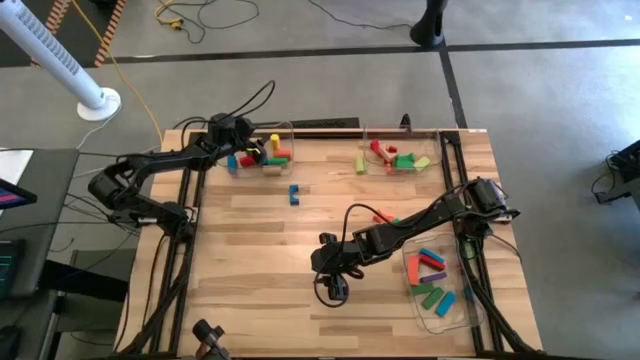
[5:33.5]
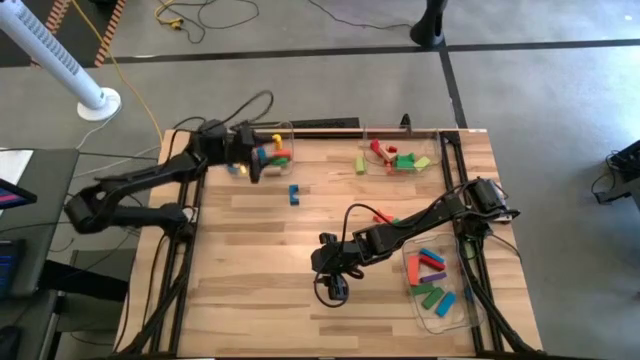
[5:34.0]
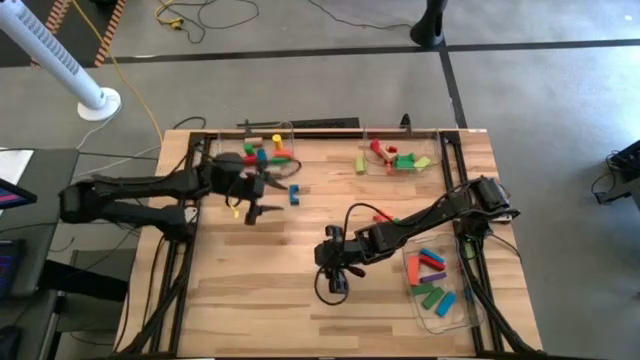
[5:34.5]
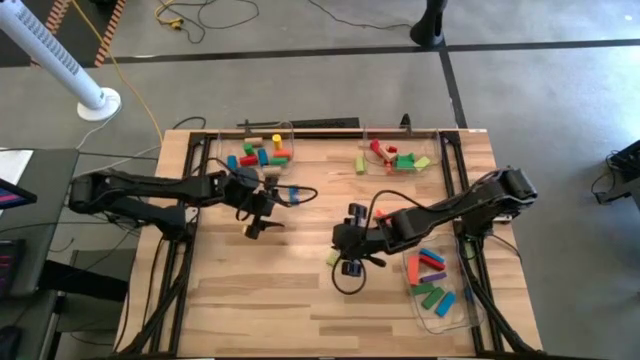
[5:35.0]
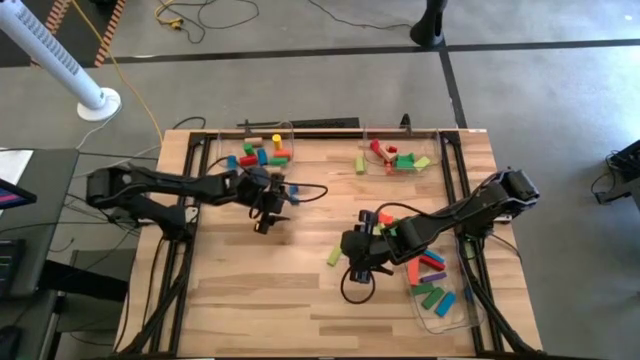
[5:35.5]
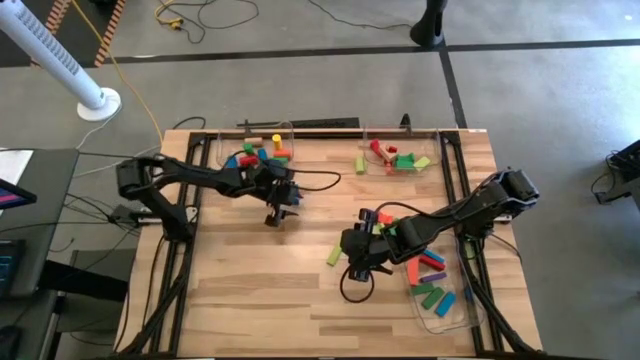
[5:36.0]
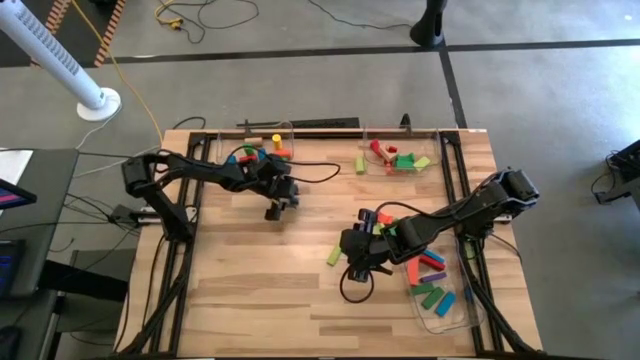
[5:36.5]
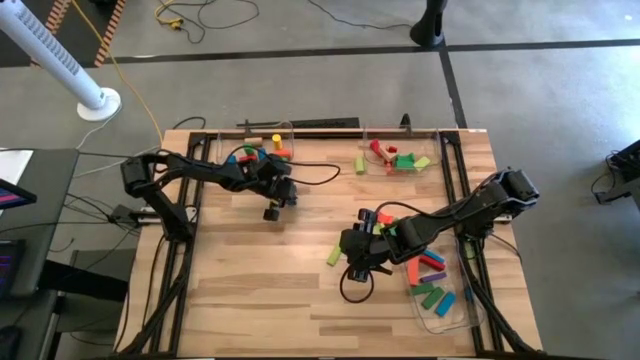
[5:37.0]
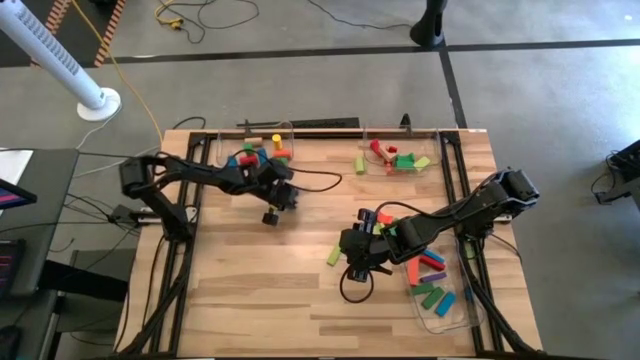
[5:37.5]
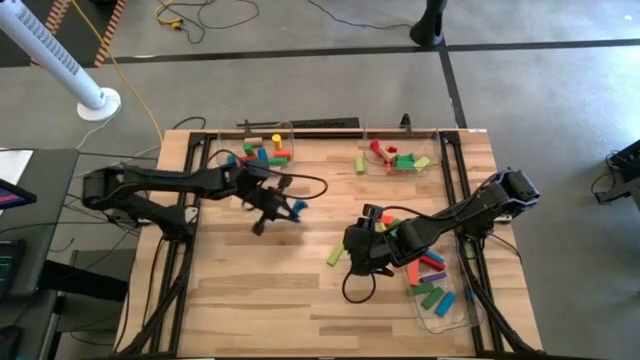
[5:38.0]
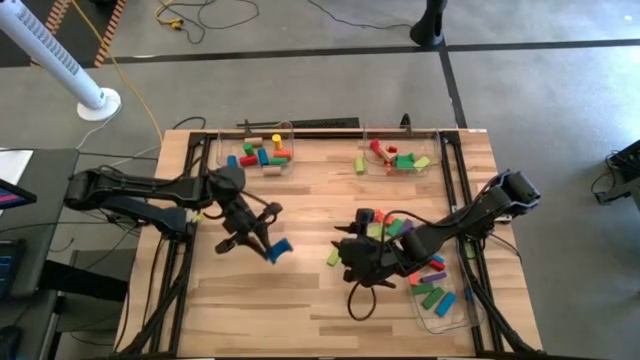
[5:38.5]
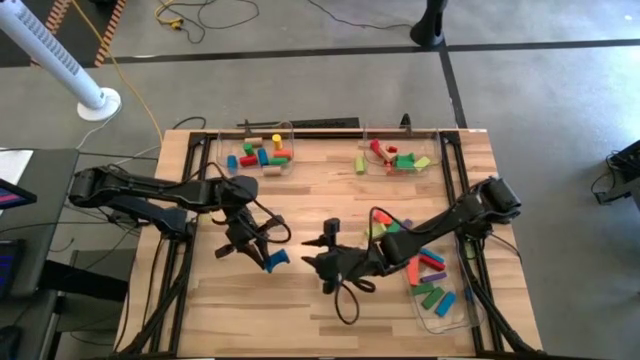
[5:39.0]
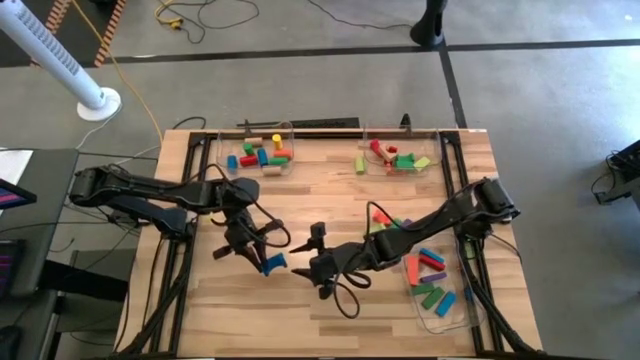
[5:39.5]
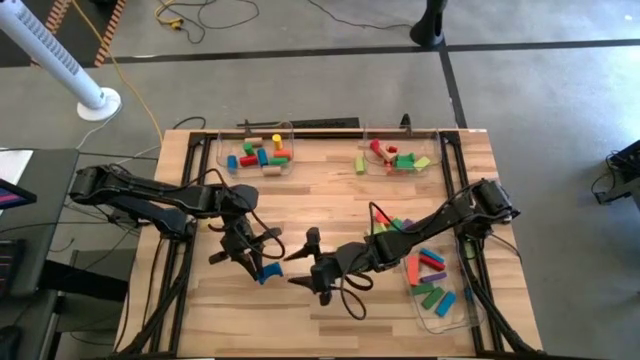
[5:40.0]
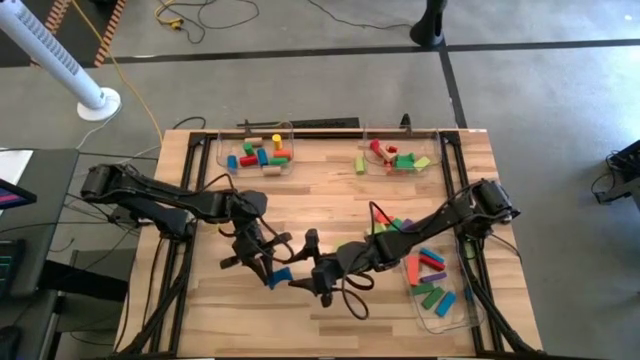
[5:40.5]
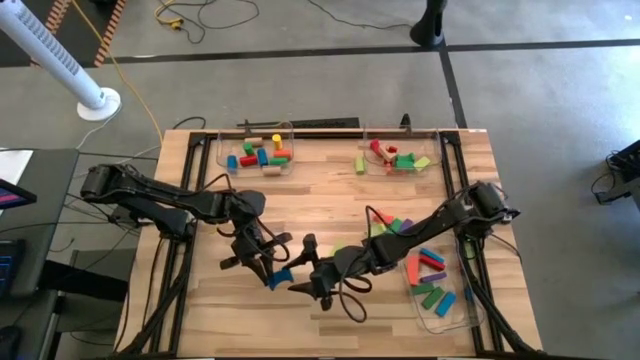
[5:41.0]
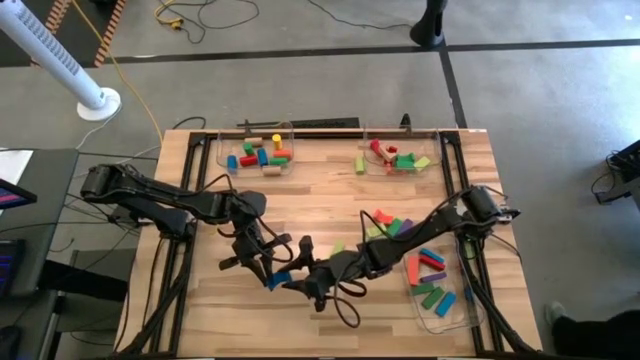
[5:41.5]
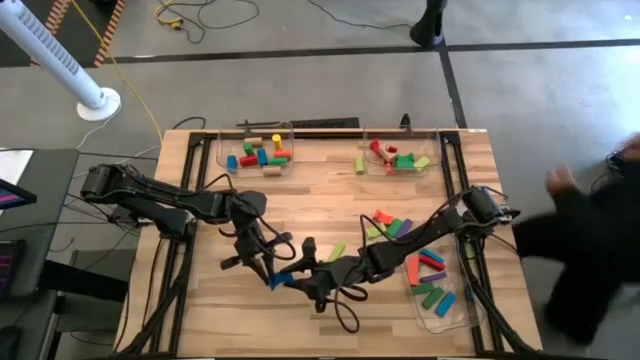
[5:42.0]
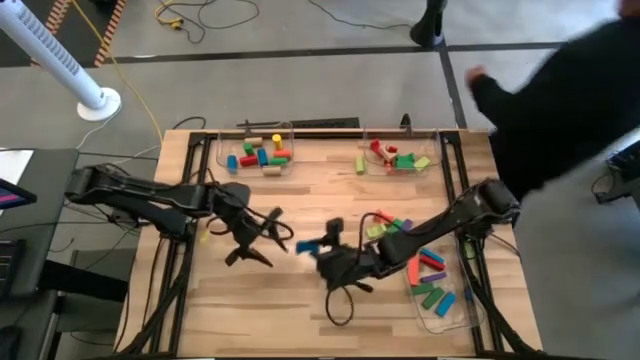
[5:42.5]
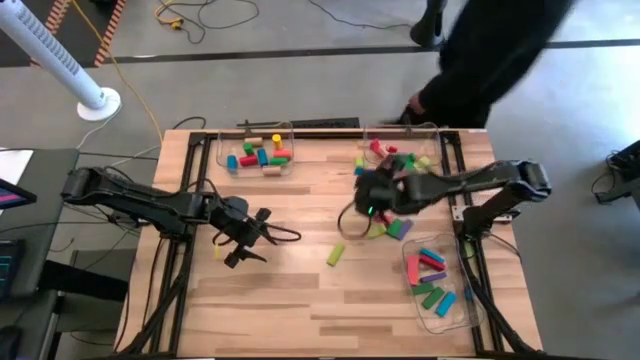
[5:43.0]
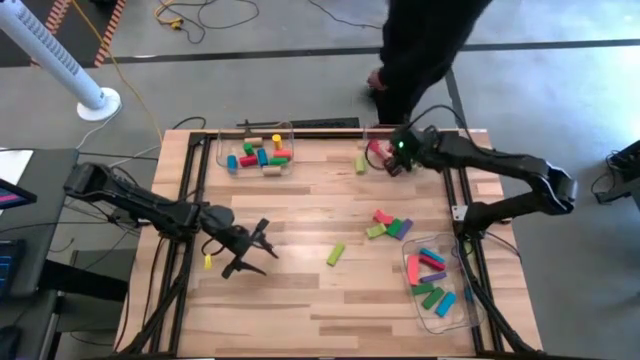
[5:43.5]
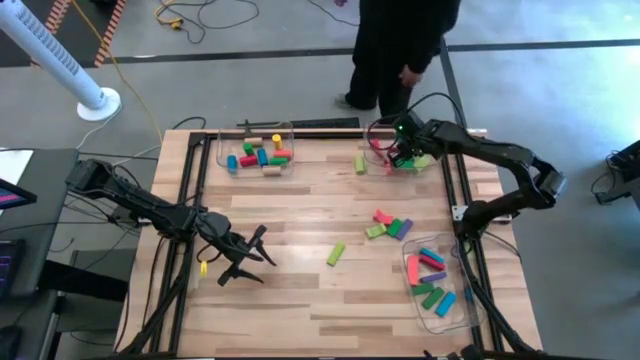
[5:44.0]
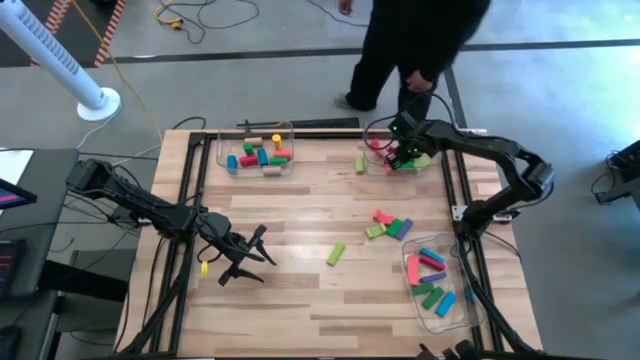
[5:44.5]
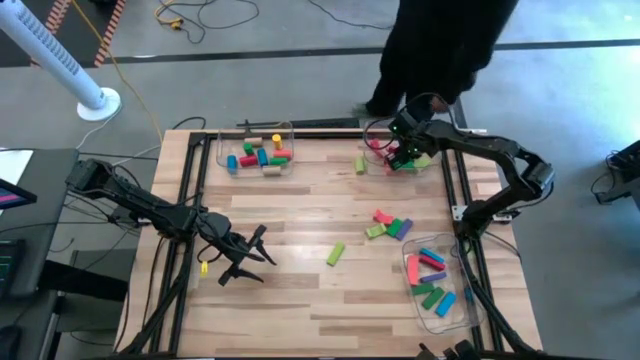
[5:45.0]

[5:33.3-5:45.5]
Task: Sort blocks by size
Put the blue arch block into the top right transparent bin

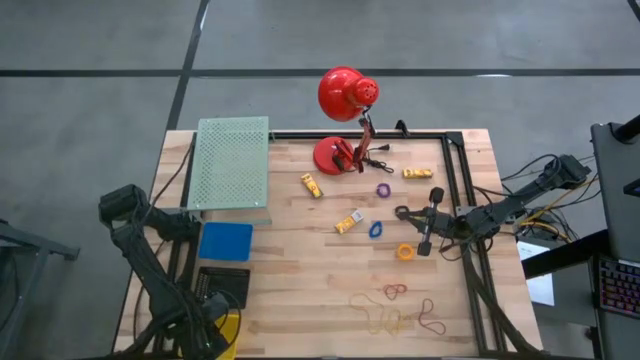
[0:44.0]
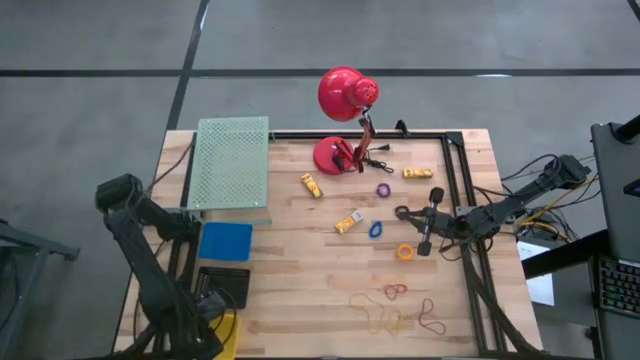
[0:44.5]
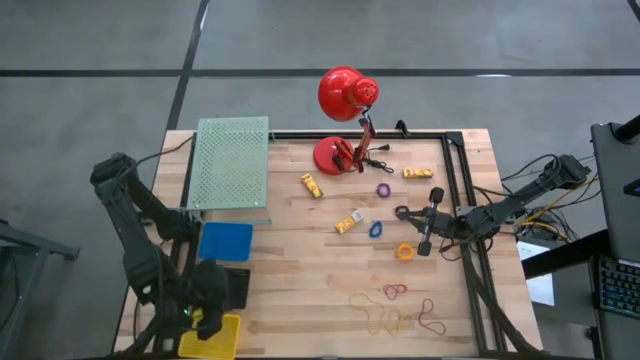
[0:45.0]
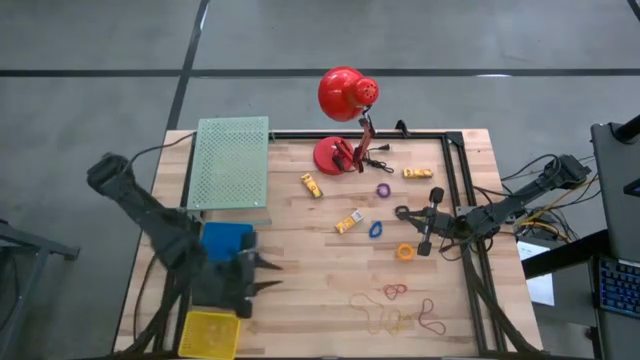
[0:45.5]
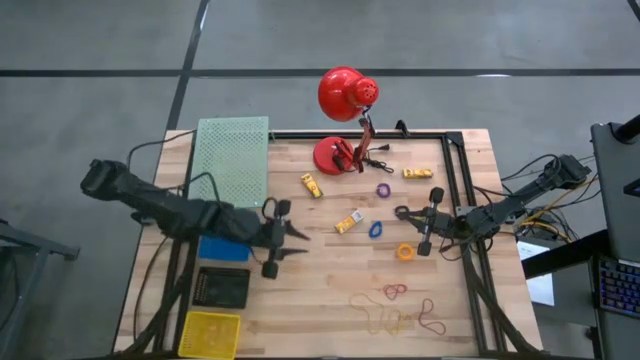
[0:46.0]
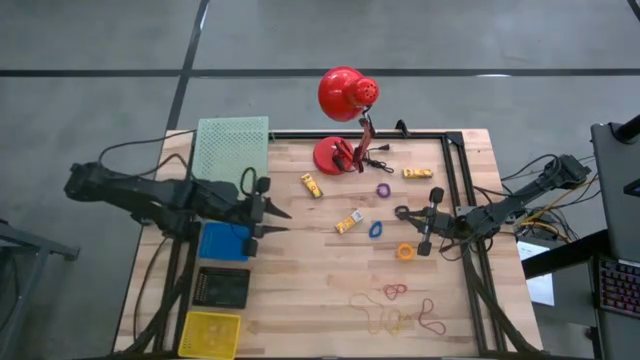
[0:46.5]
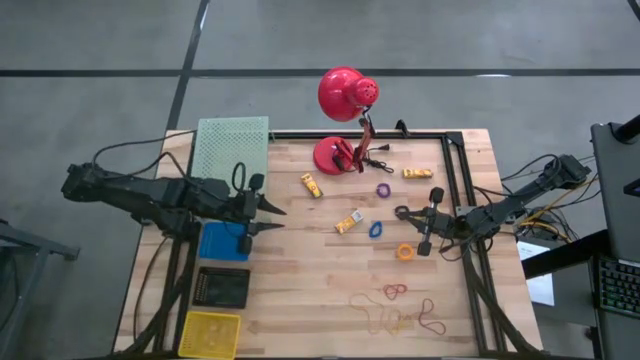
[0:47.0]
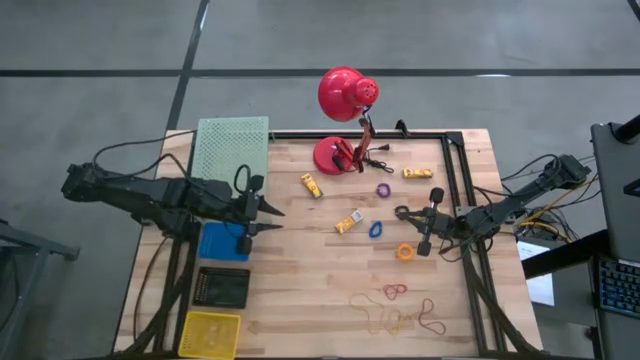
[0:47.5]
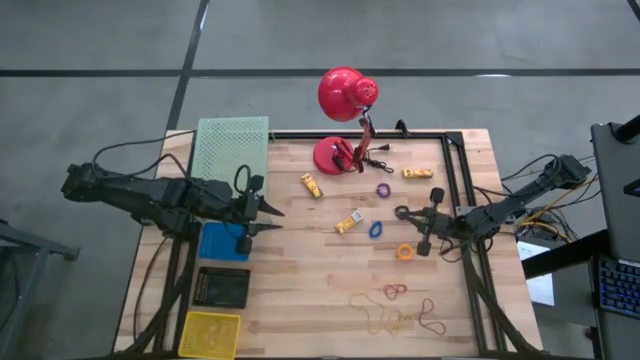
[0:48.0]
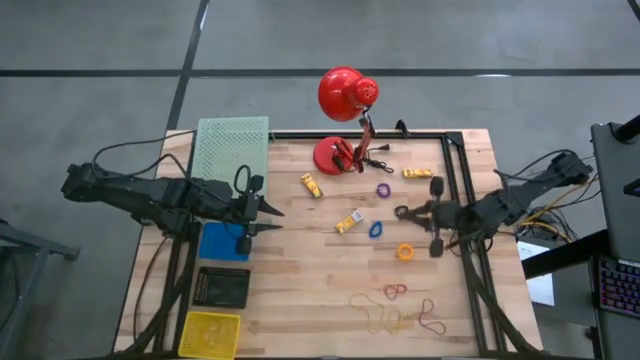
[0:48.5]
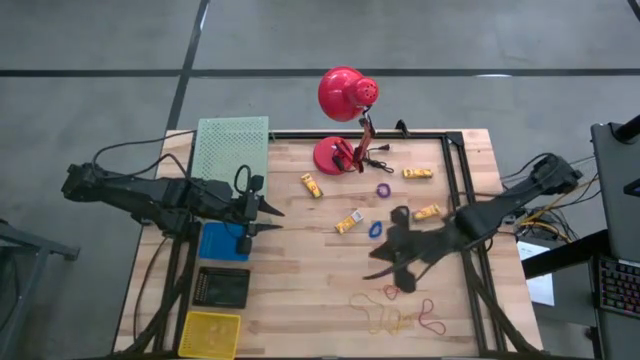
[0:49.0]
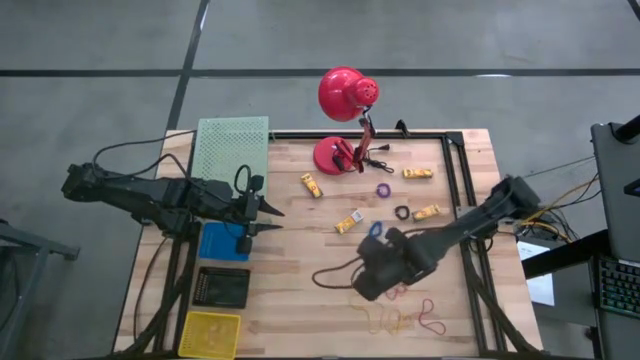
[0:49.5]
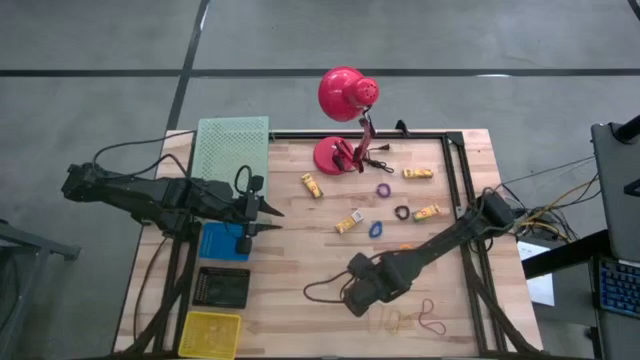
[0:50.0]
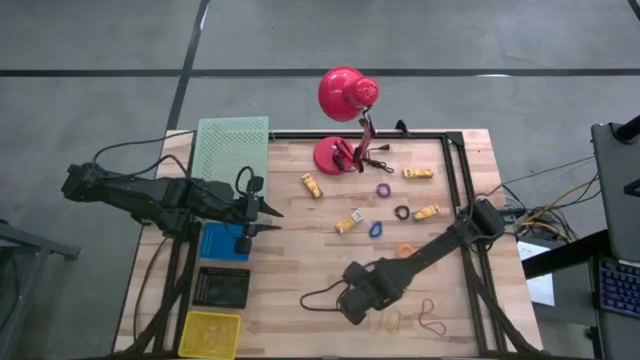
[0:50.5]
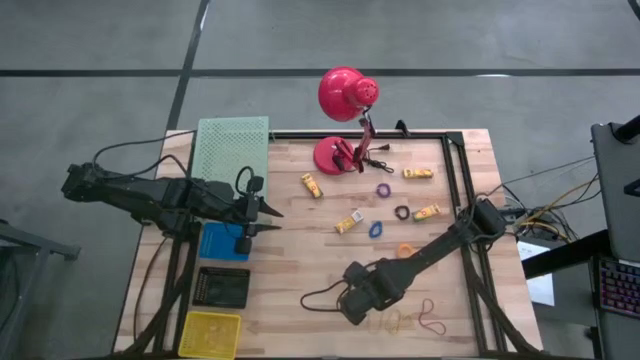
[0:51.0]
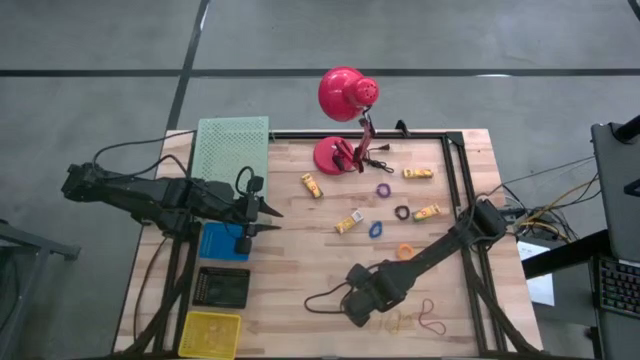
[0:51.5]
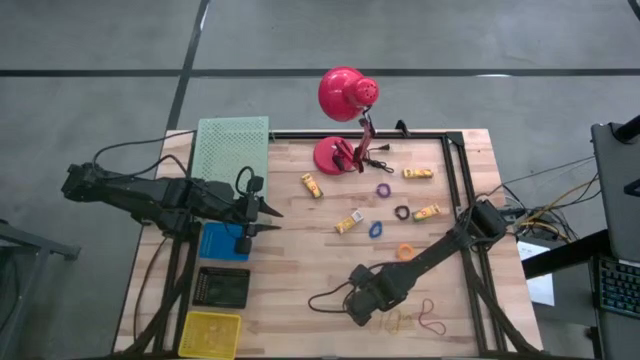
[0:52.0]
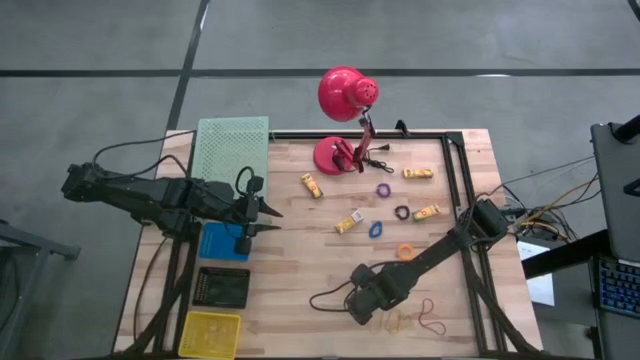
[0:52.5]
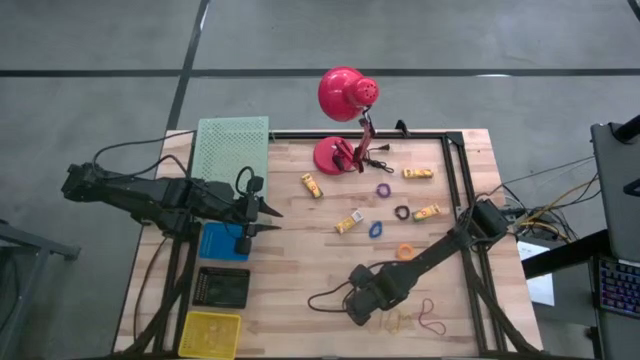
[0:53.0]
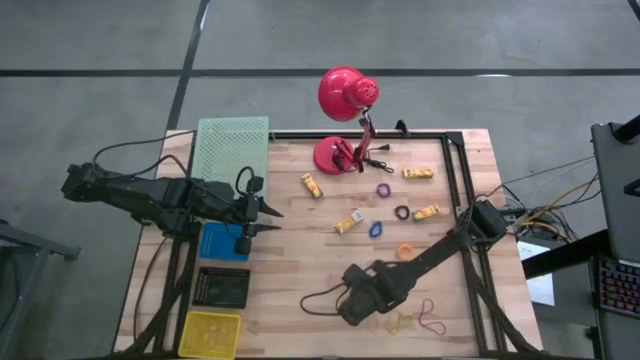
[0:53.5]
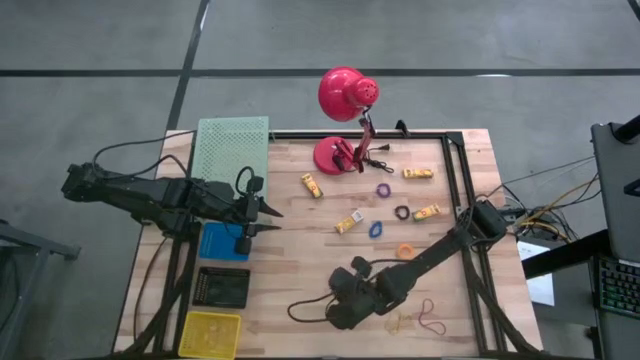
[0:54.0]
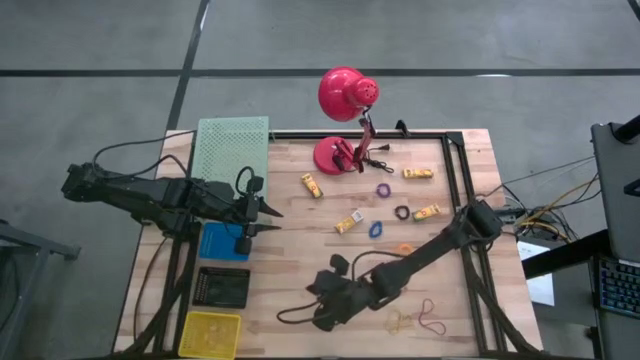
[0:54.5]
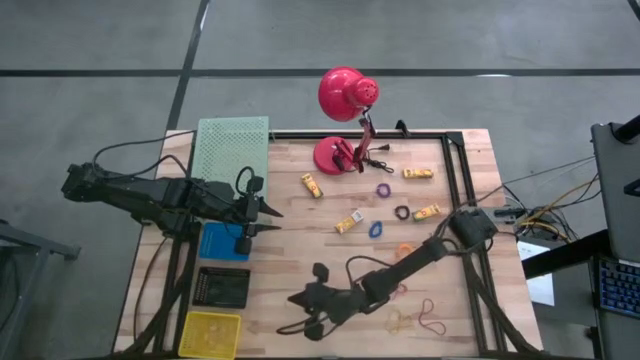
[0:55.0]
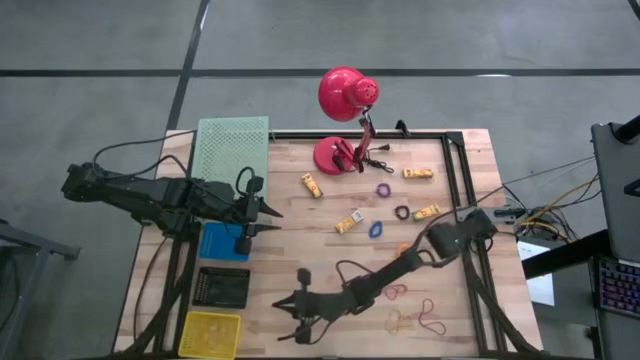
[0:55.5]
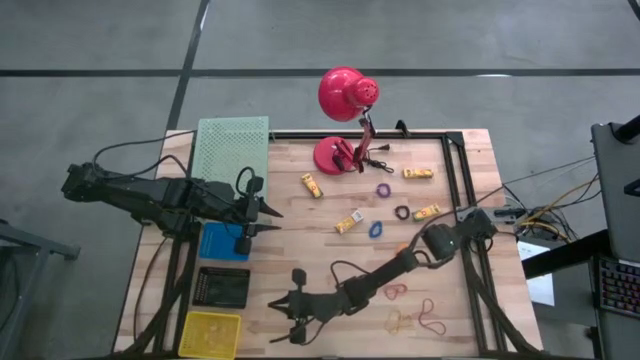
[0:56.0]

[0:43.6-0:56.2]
Task: Pick & Place Office Desk Supplies
Put the yellow rubber band into the yellow bin
